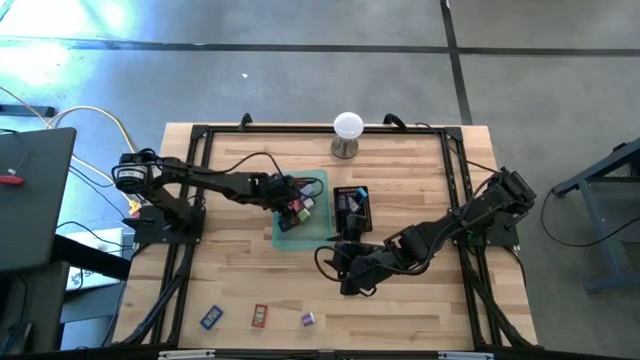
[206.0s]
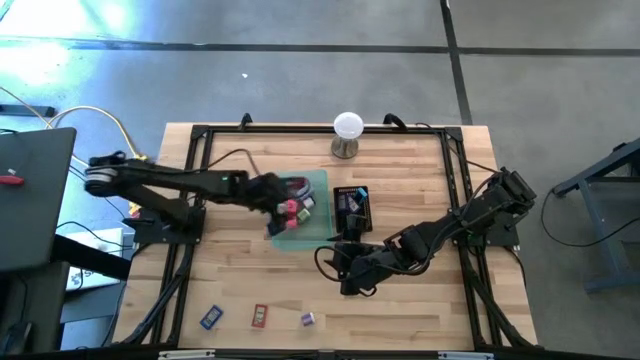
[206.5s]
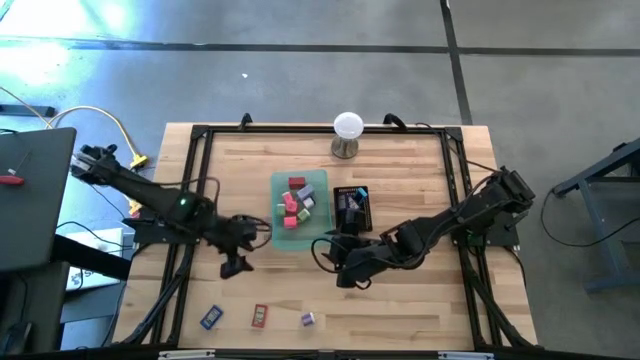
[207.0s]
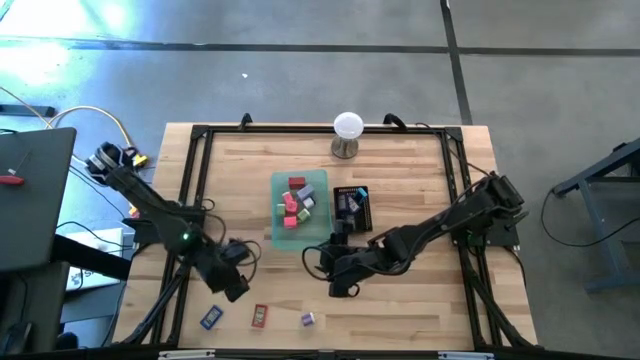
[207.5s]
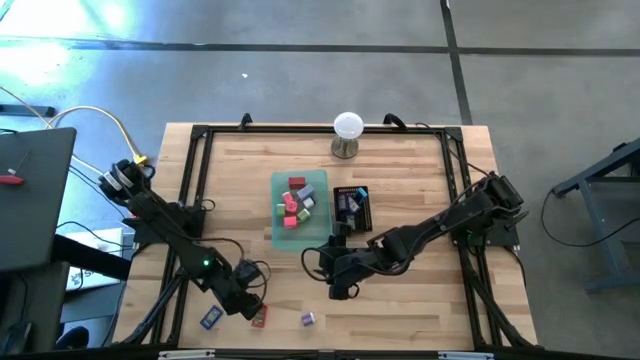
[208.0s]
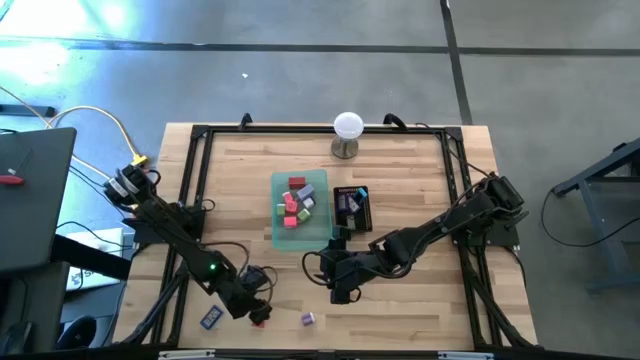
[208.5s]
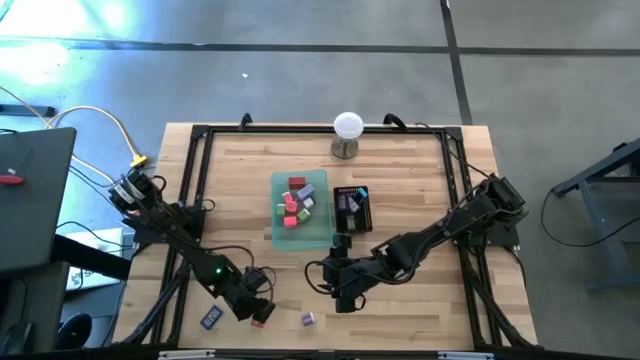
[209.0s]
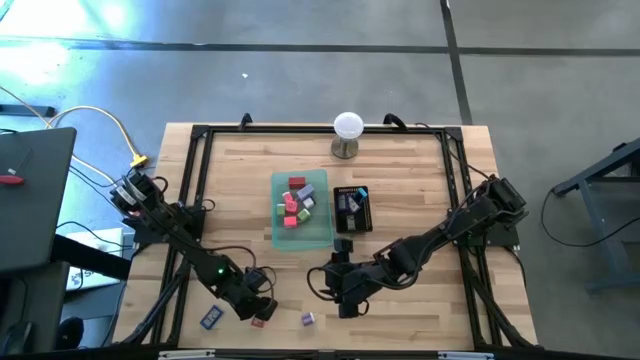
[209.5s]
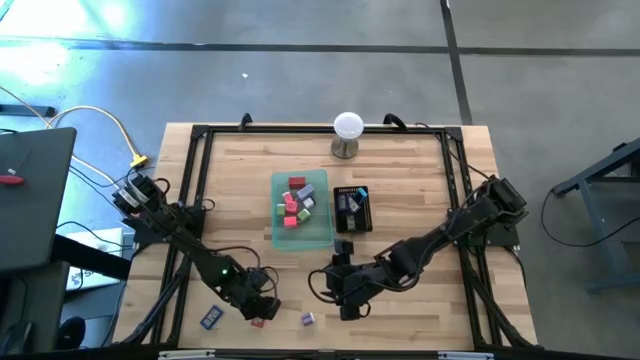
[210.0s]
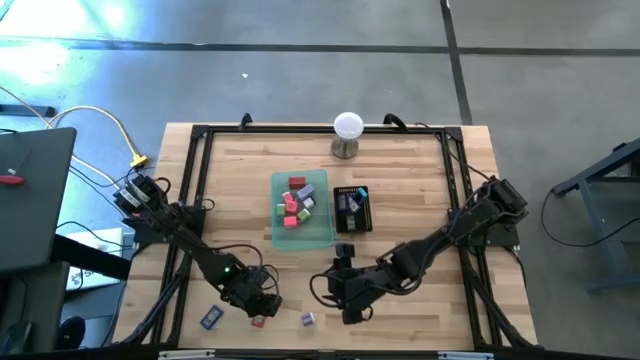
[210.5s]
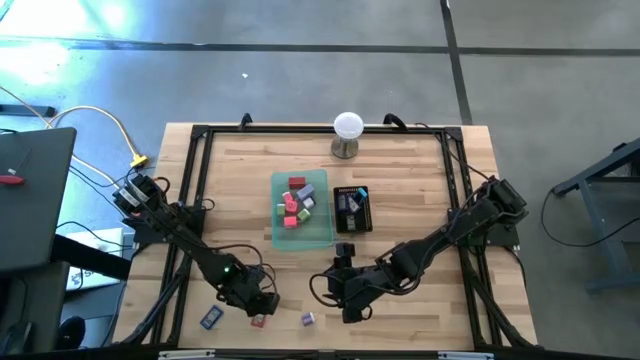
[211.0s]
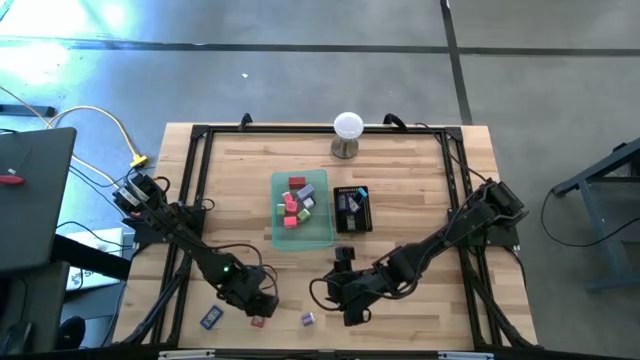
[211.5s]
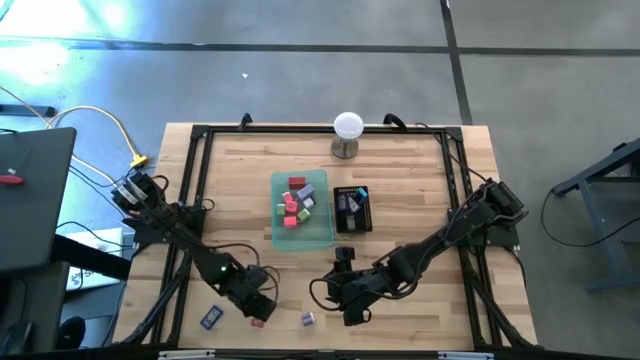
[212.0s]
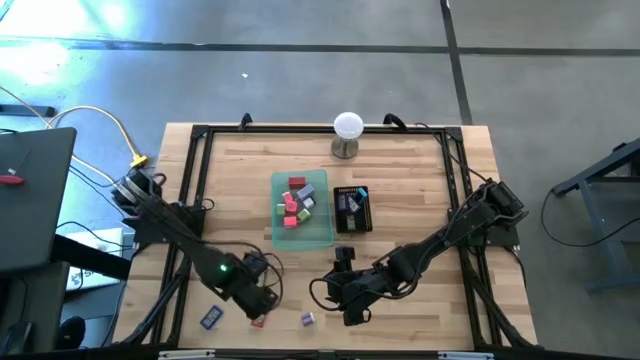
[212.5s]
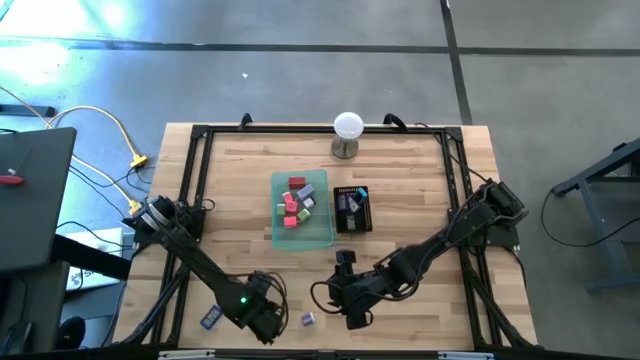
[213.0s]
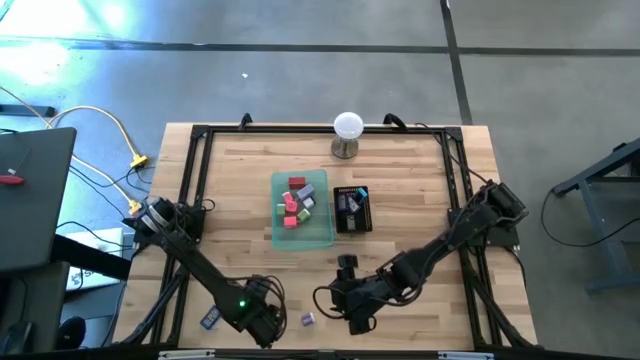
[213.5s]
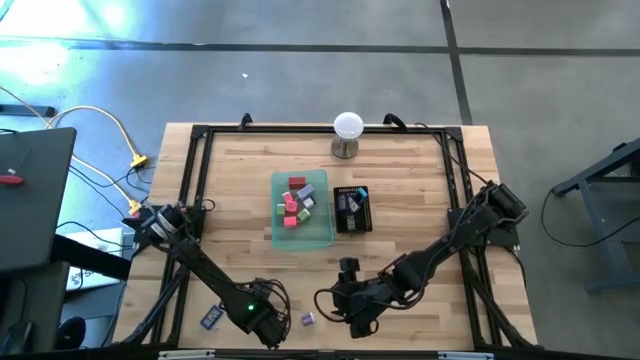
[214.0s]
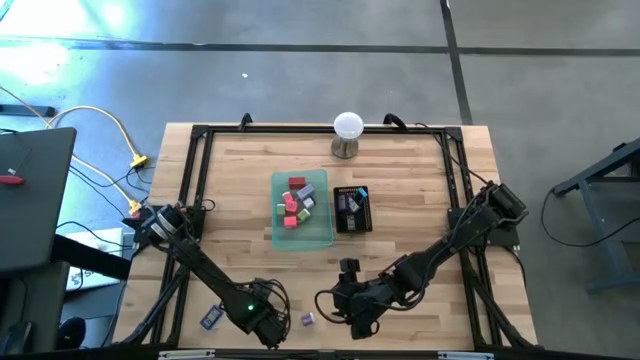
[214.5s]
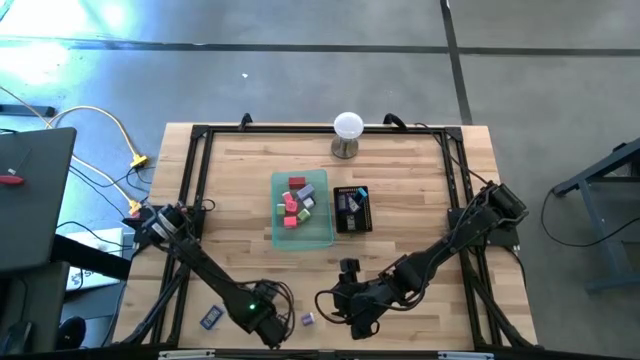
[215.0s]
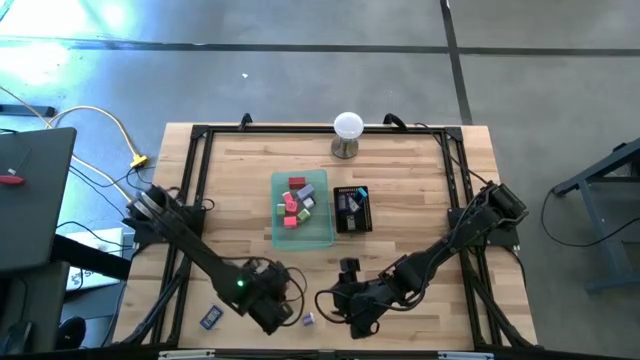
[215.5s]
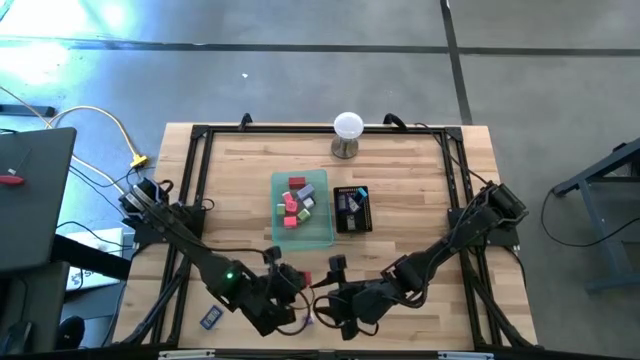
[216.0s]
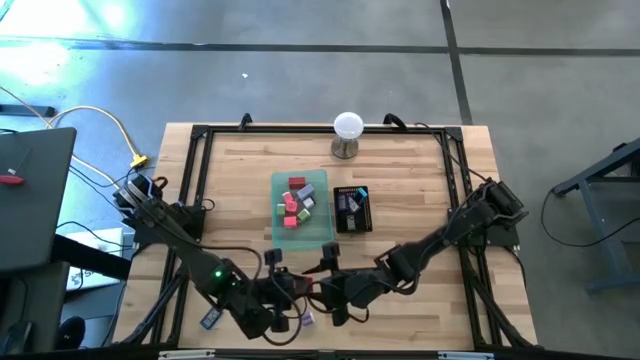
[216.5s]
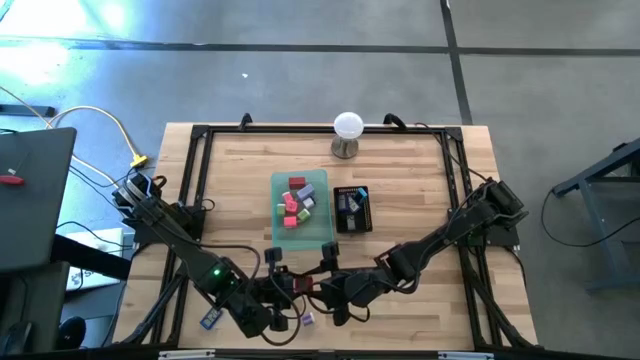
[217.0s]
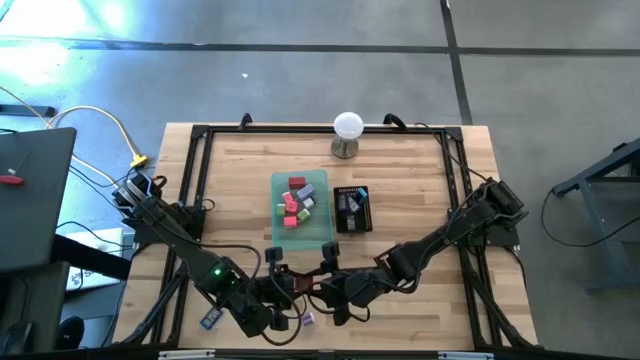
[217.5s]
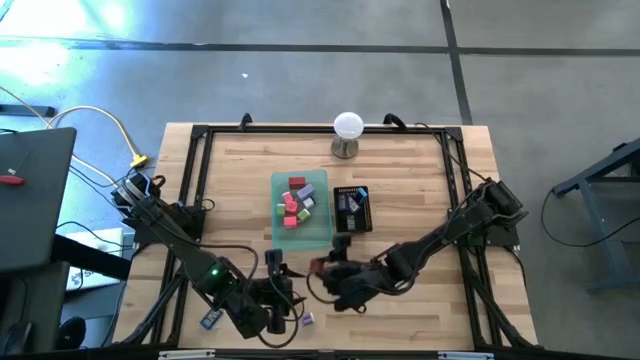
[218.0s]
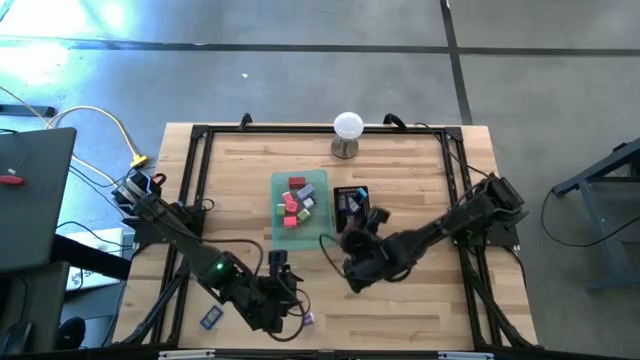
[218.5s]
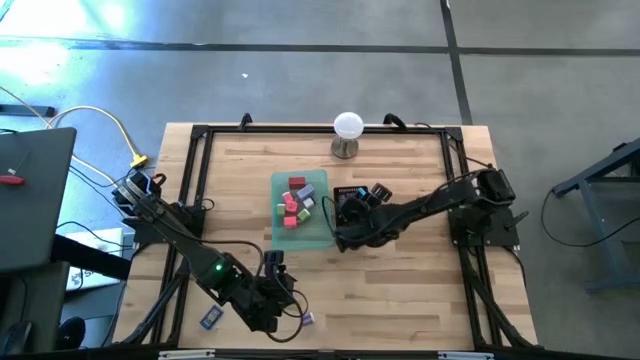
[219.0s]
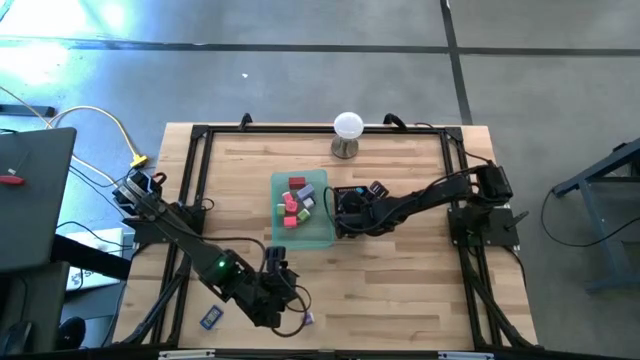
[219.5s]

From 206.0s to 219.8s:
Task: Pick & Place Office items
Put the red digital clock into the black bin

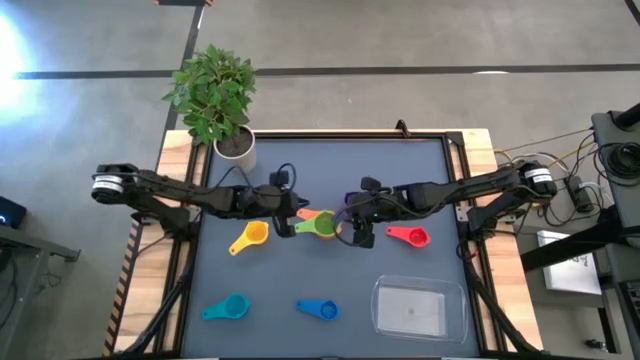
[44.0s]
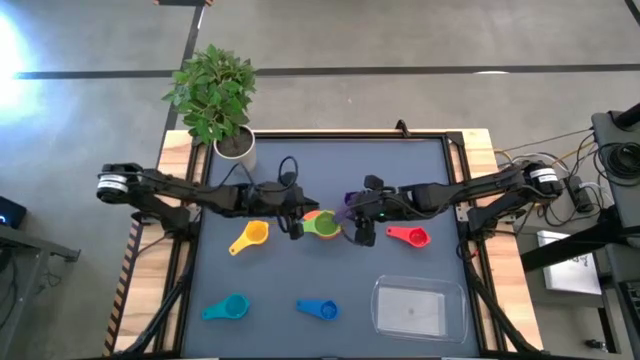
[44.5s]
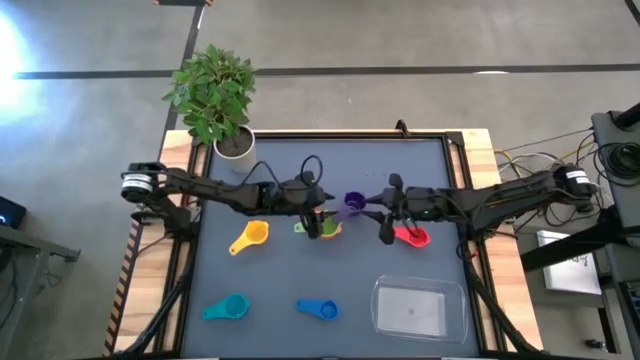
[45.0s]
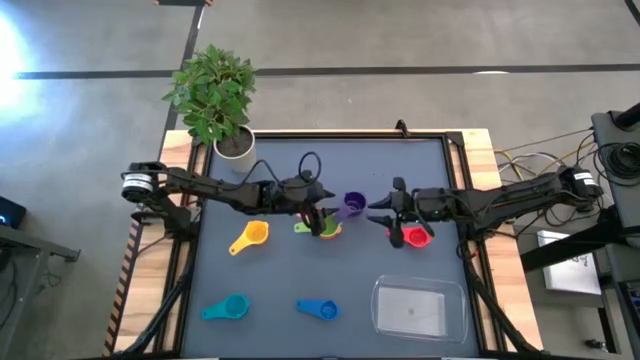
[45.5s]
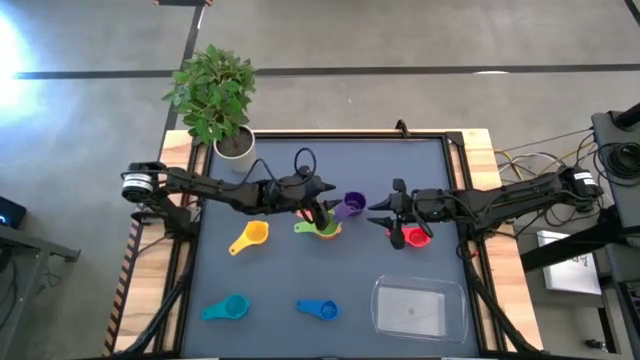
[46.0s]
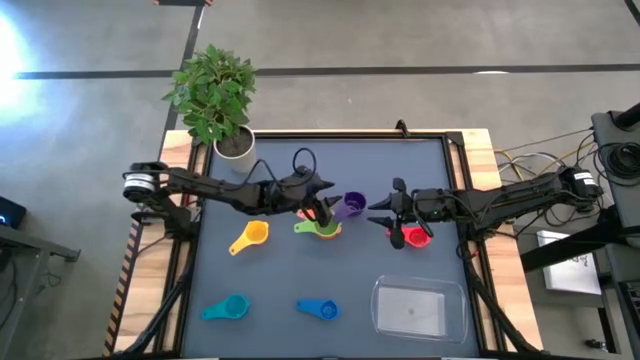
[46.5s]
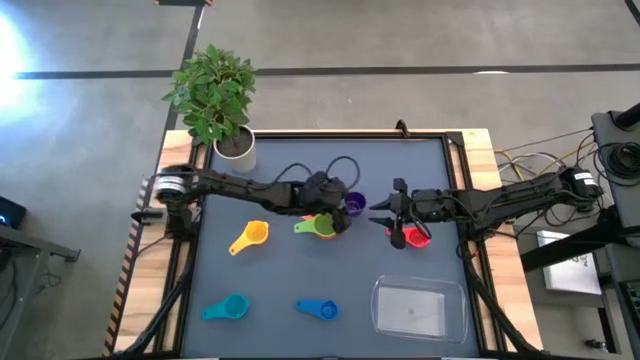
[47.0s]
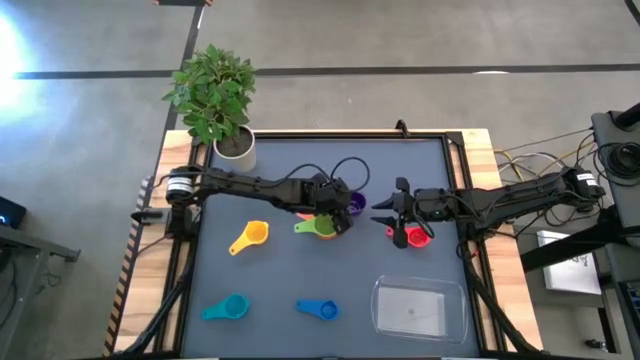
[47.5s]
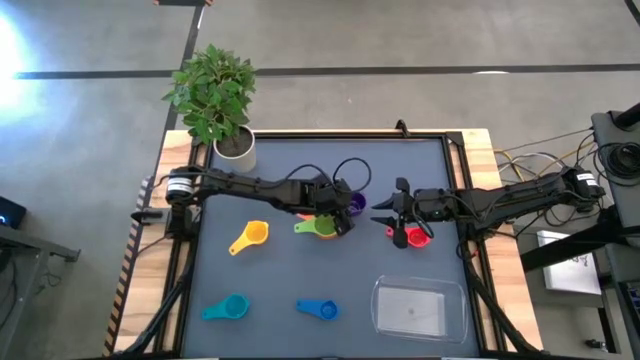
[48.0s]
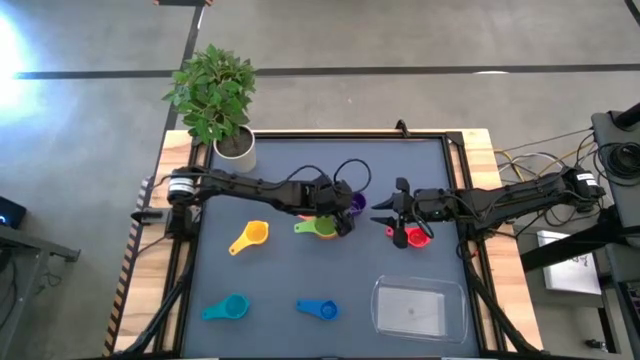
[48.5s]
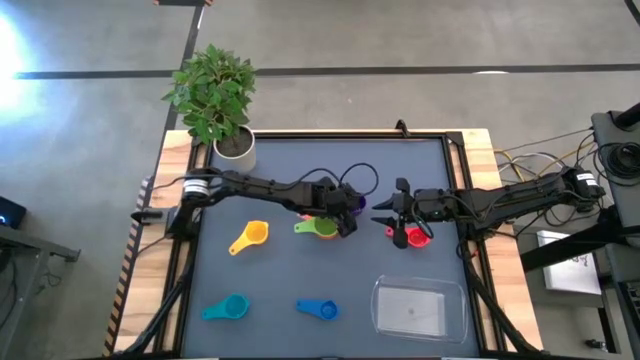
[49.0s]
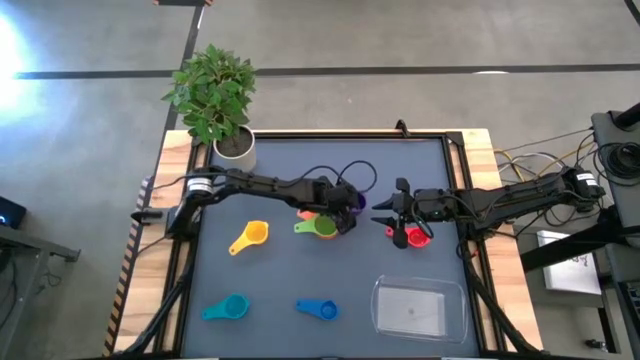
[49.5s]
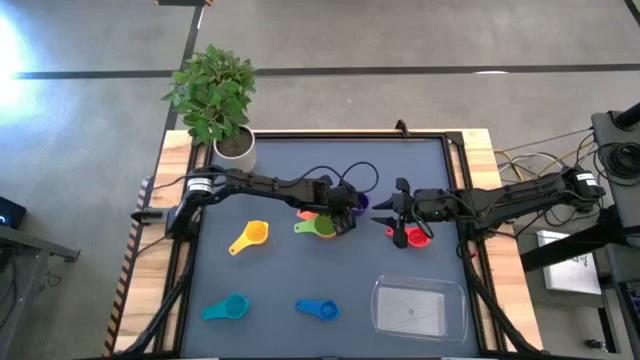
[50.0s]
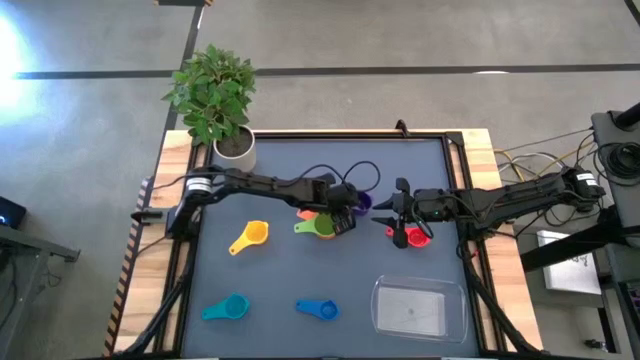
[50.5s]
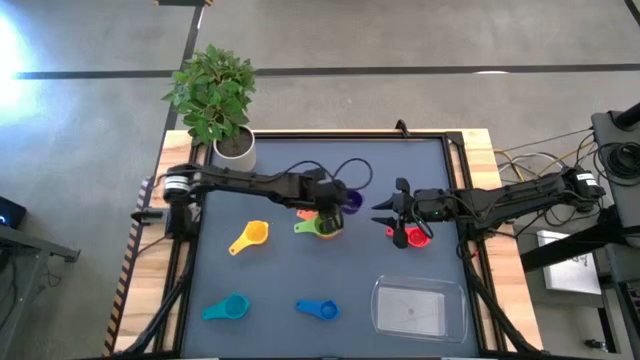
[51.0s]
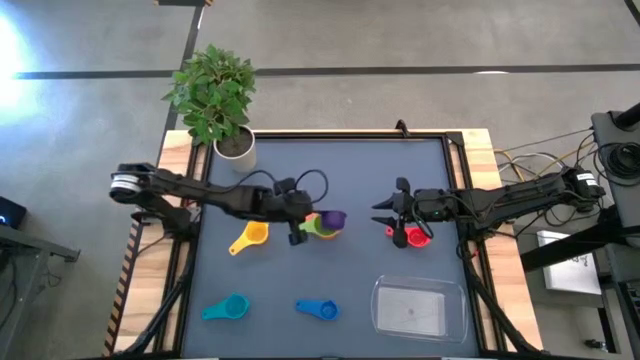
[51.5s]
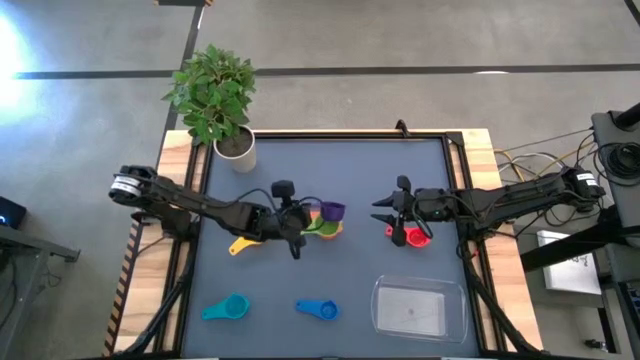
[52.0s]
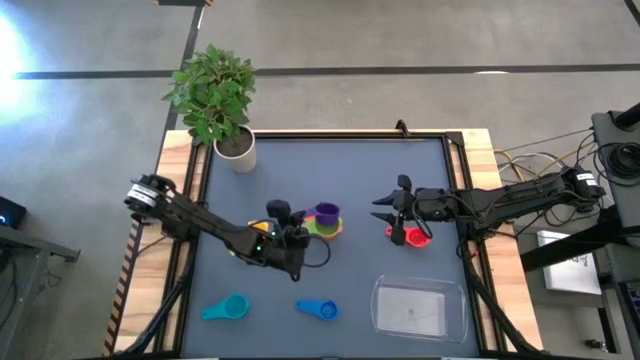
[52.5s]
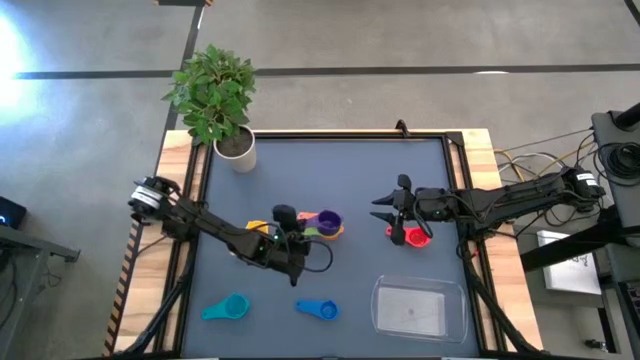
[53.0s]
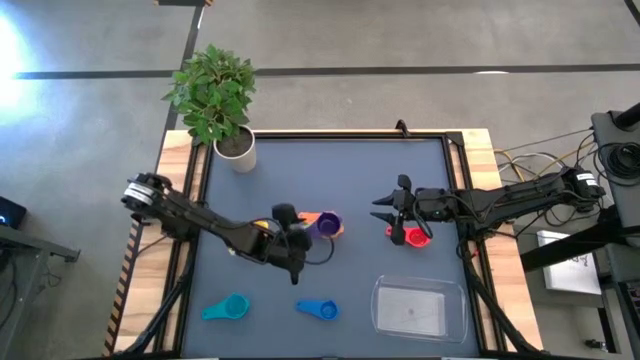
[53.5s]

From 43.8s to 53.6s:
Task: Nest measuring cups in basket
Stack the purple measuring cup on top of the green measuring cup
